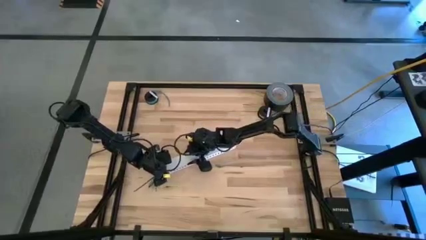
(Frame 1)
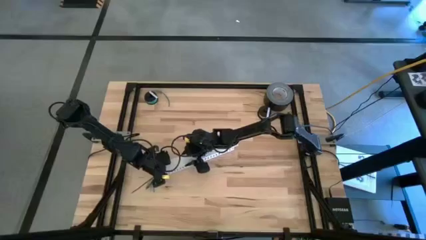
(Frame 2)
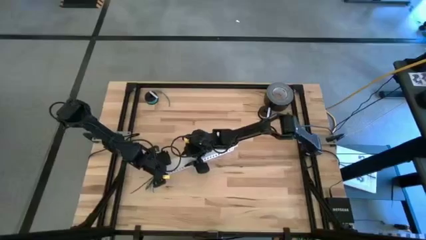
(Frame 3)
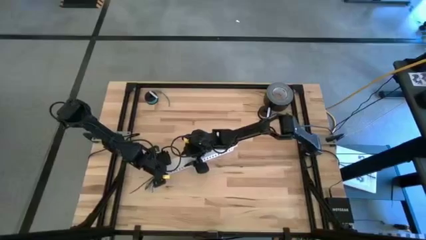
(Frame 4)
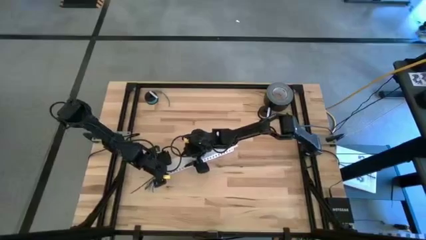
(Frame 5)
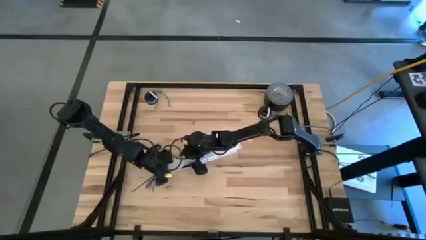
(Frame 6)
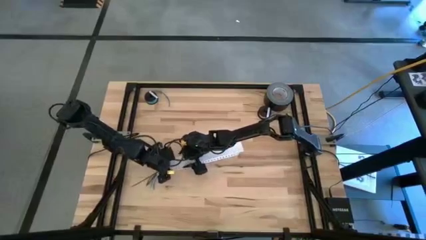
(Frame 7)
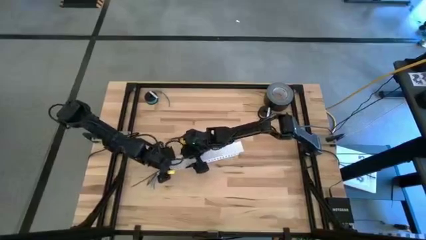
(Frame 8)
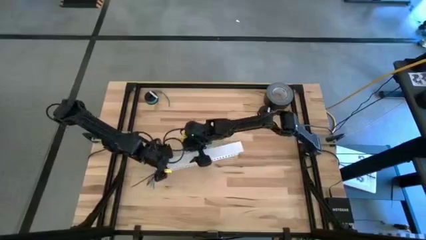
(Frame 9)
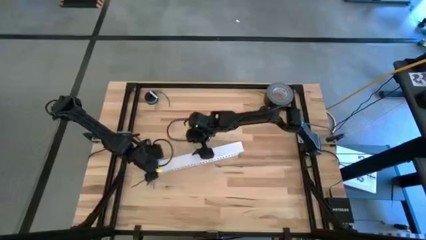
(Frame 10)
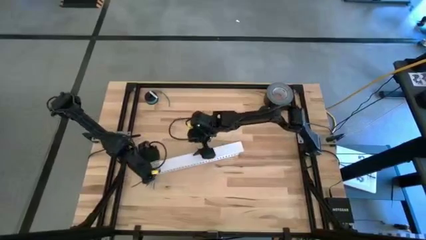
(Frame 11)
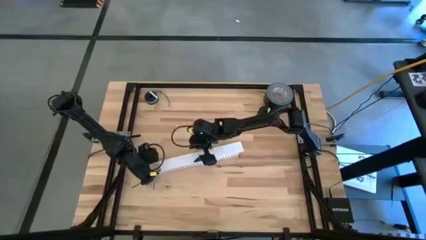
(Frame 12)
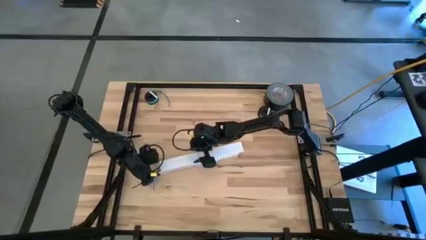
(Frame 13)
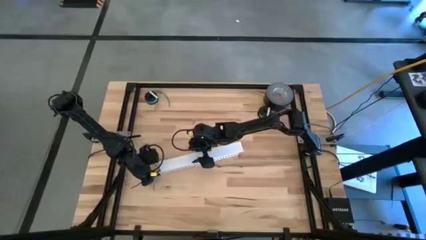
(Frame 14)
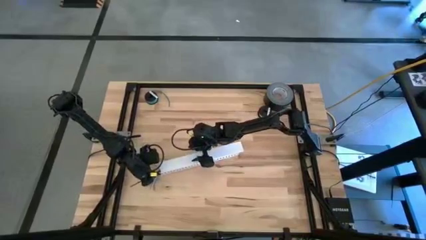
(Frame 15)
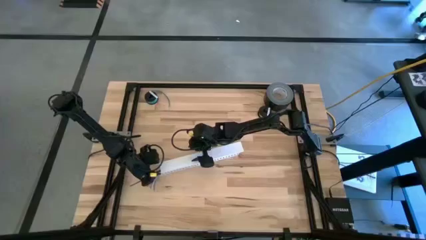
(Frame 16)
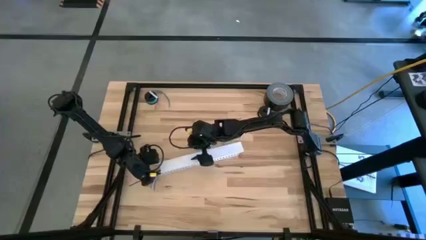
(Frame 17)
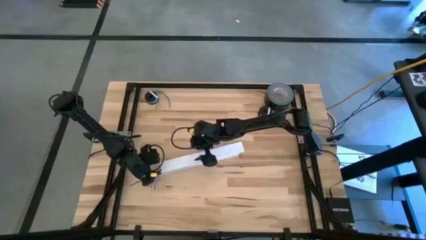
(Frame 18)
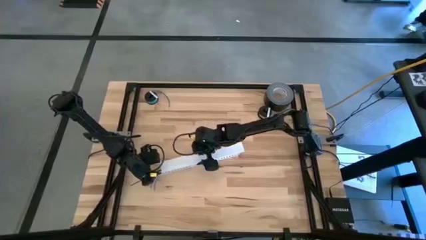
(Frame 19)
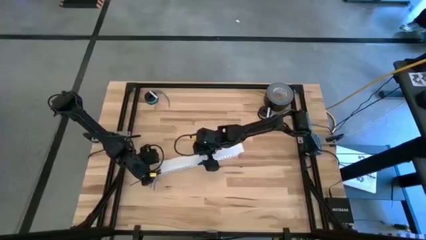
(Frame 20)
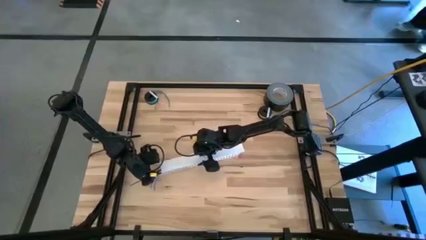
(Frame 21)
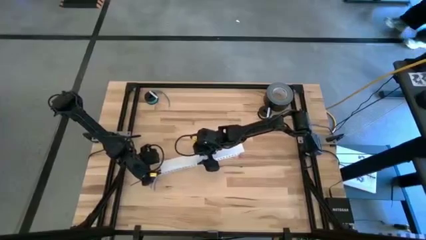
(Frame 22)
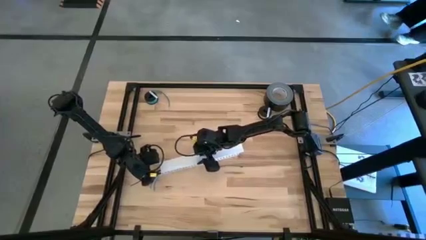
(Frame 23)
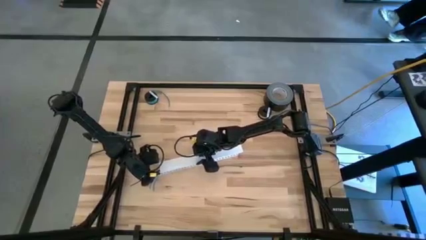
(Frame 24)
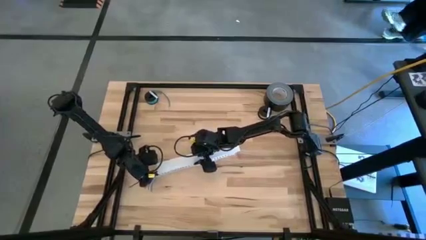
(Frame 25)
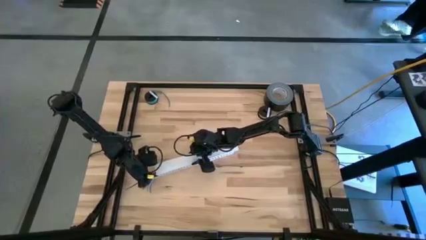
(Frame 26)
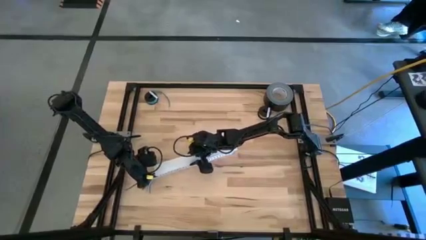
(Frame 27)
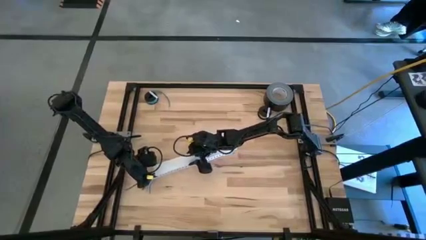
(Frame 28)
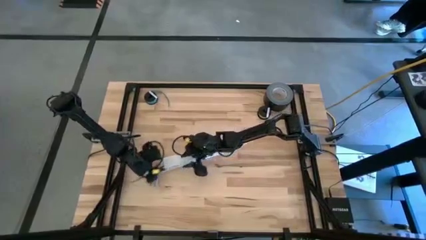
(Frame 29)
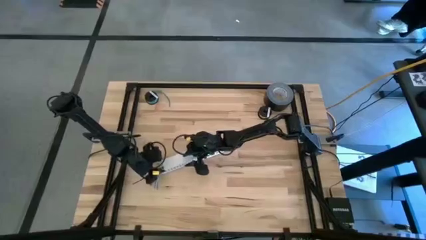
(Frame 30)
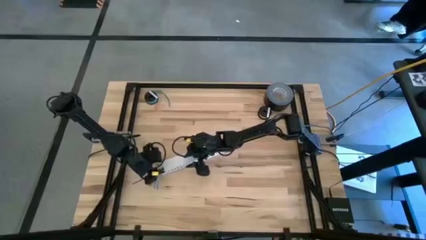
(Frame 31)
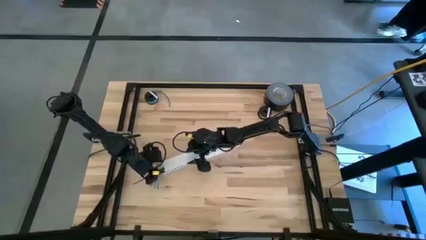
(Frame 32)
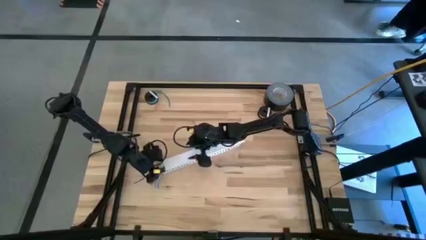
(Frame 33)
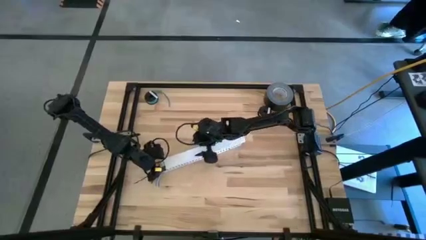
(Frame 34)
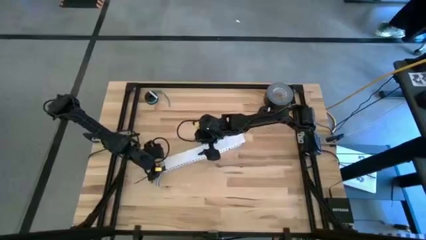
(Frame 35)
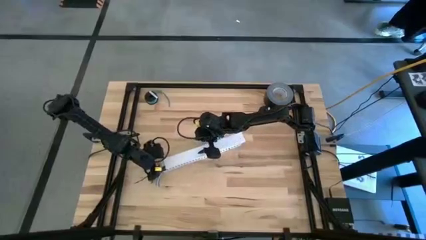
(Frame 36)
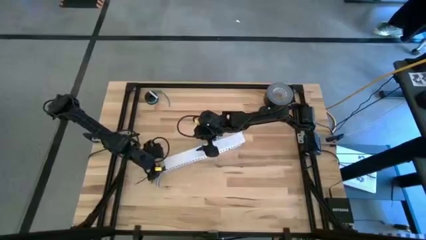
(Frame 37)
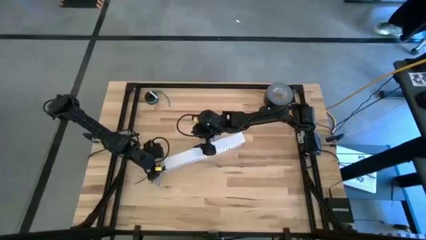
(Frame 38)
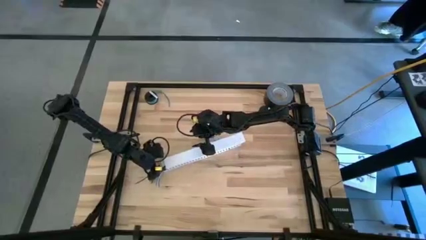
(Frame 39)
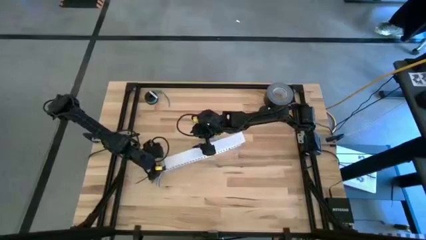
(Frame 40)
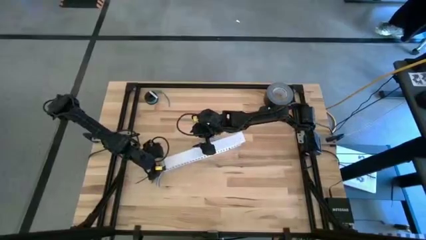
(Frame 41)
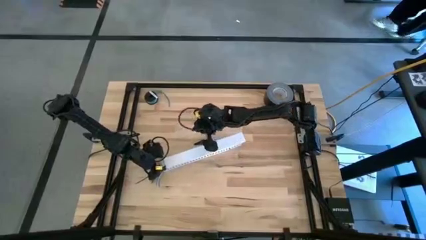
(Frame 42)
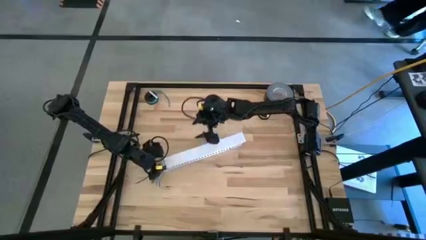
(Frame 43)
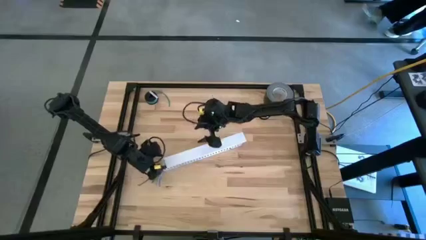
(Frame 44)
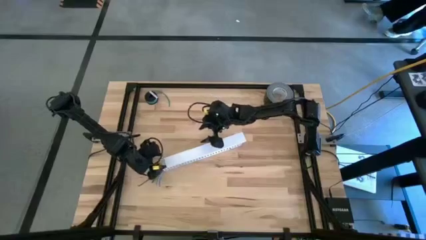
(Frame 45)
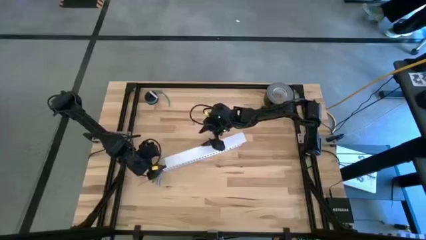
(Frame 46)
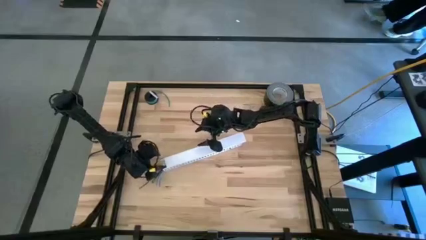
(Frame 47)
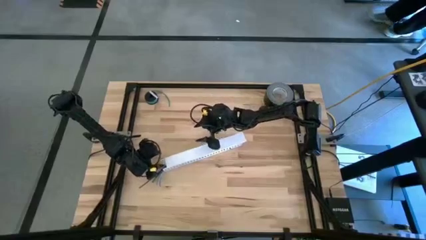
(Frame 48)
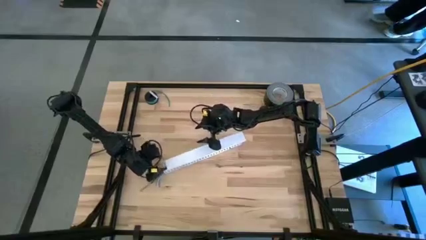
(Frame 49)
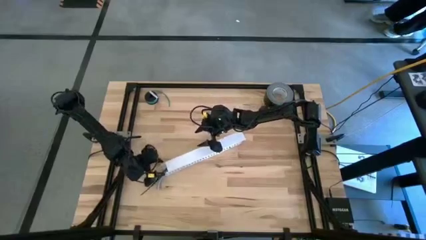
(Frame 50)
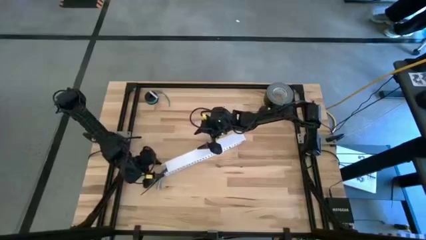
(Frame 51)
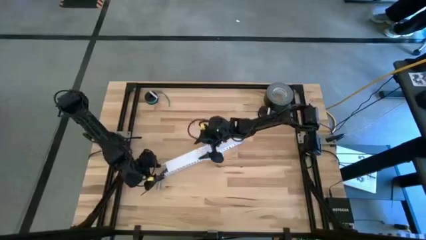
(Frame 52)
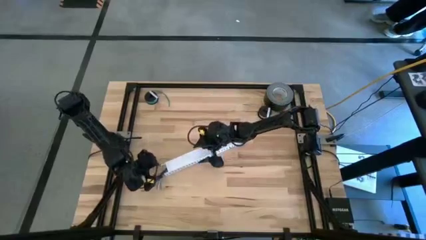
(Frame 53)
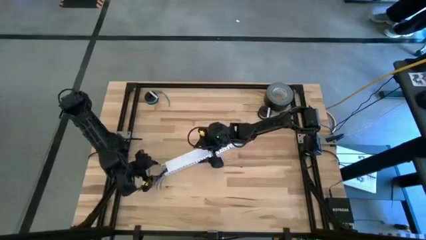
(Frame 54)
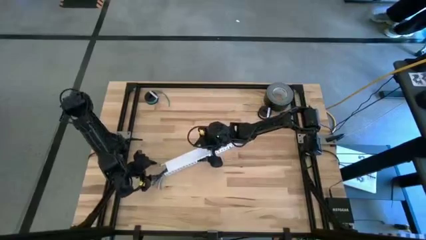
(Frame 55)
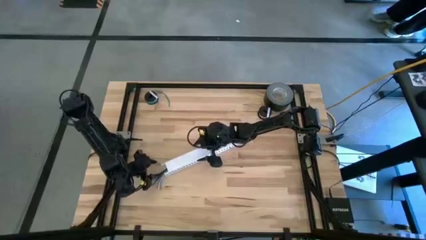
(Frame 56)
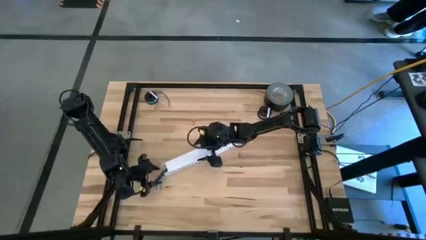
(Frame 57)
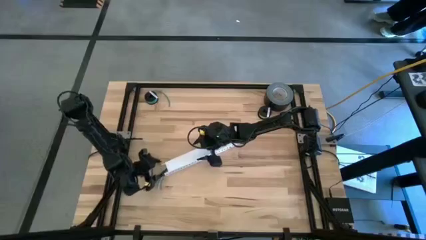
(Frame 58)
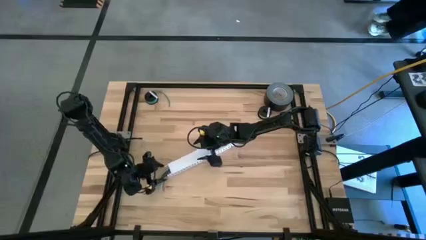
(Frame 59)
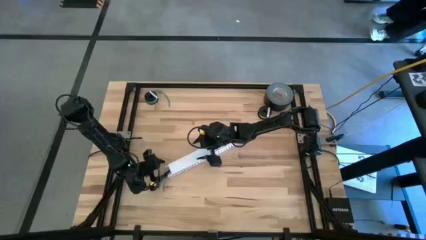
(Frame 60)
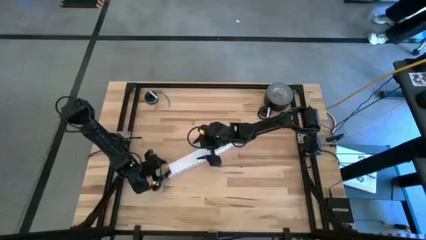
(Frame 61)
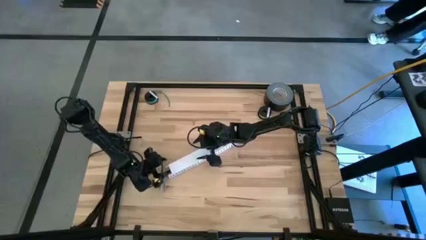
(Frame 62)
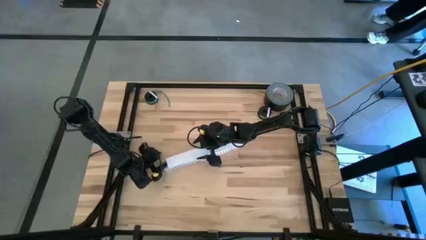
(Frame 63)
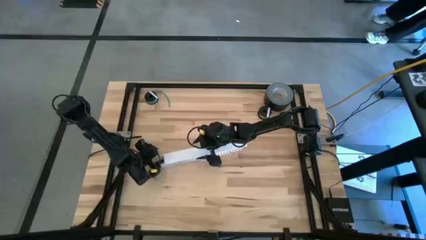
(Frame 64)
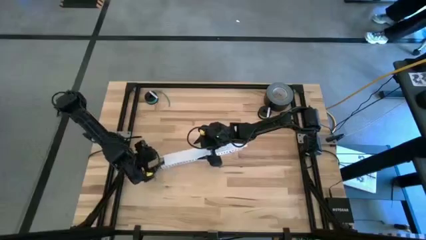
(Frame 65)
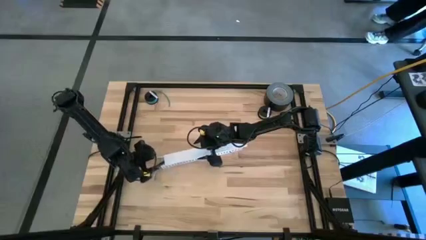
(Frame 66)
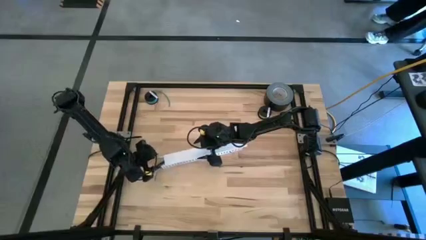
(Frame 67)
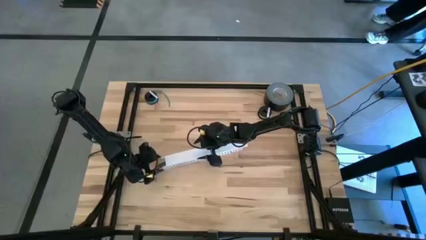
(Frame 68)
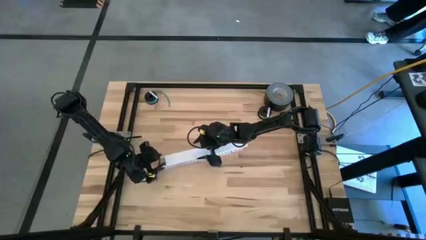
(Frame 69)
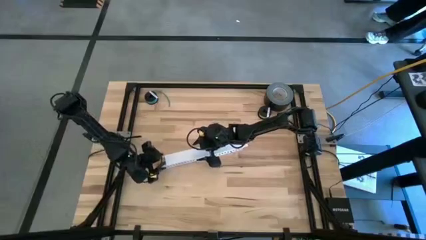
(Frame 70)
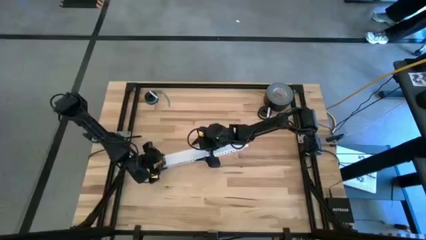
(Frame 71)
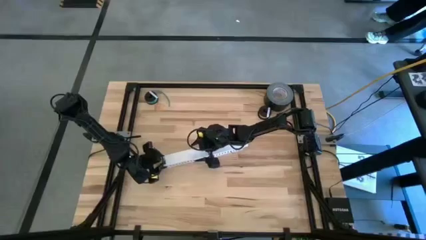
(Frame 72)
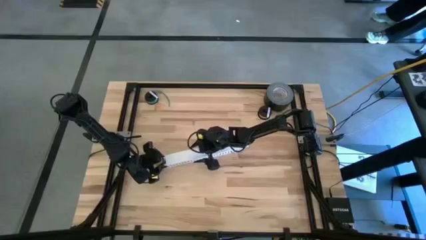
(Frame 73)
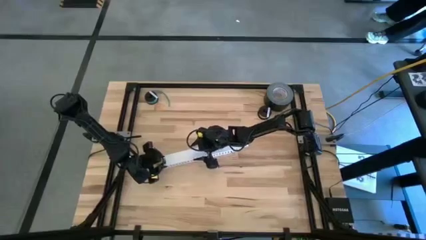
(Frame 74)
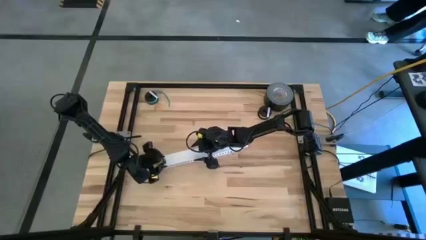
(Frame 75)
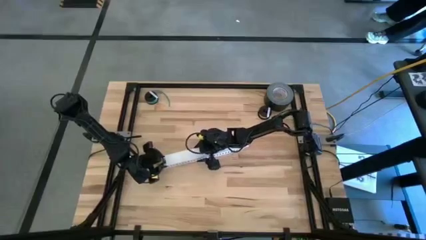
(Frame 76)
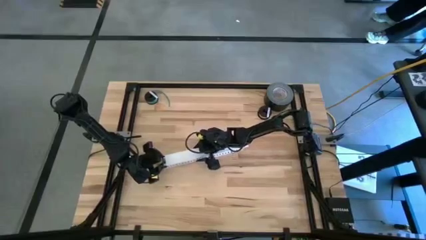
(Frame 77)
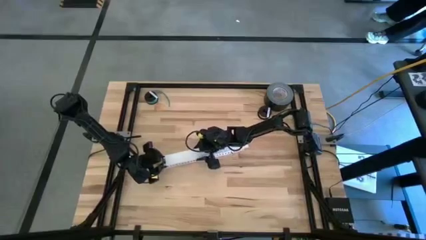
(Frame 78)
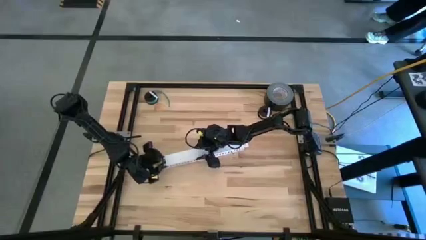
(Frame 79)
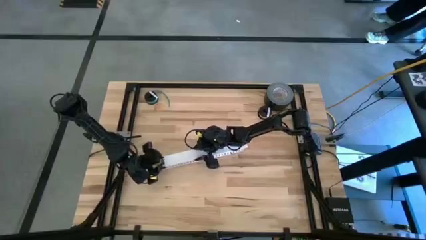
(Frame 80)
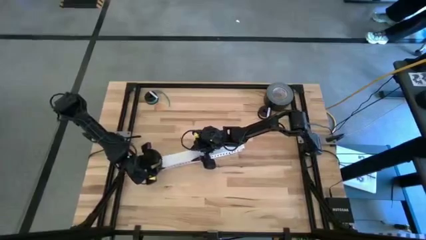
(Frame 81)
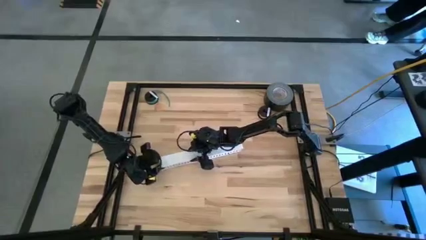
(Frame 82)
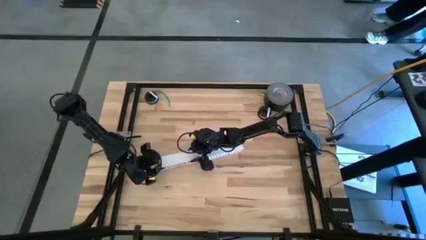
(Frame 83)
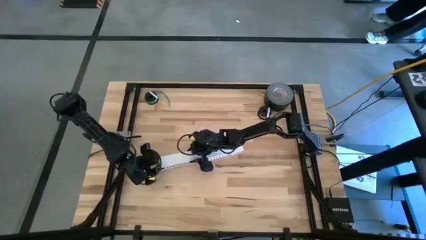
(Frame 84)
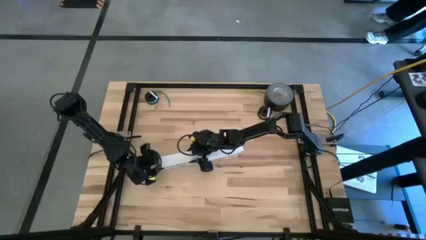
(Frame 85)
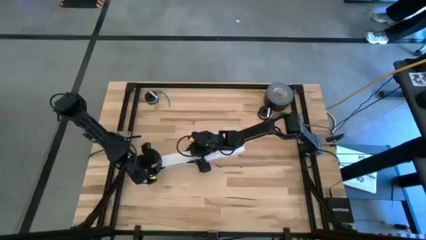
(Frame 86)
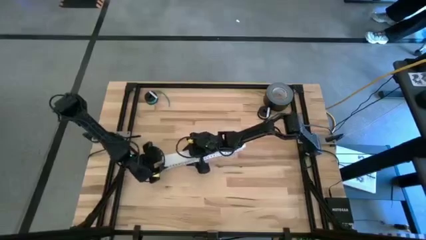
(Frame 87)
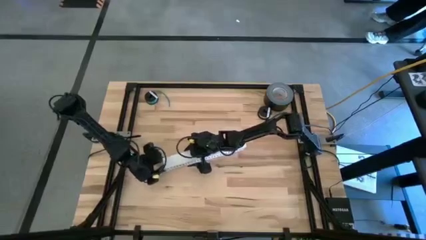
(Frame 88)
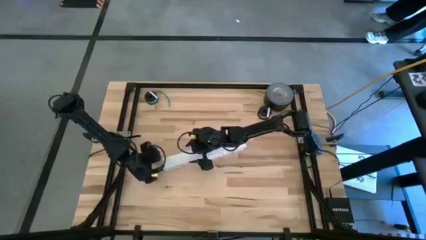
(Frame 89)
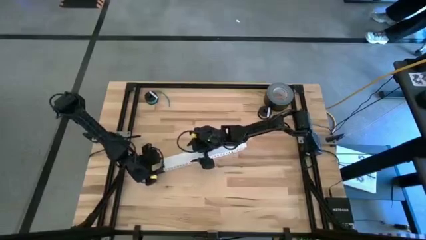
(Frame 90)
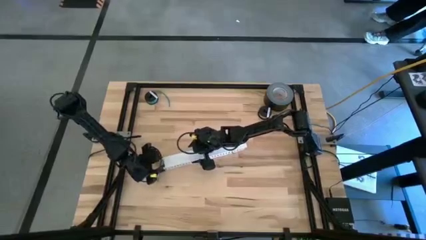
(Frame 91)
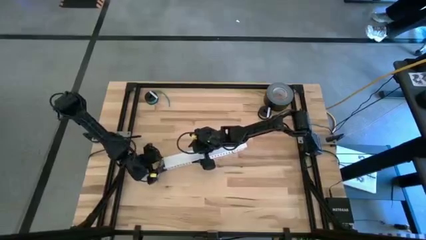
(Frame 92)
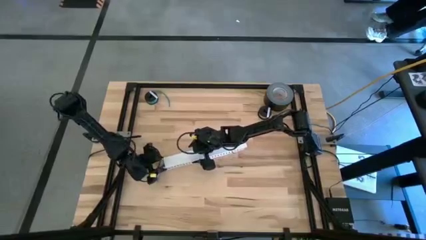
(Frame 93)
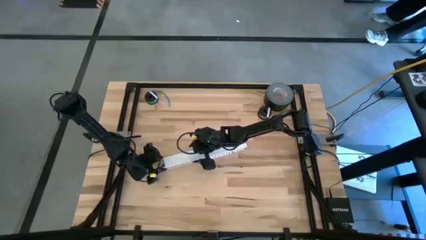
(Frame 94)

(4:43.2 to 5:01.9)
Task: Ziptie cables
Close the white cable duct
